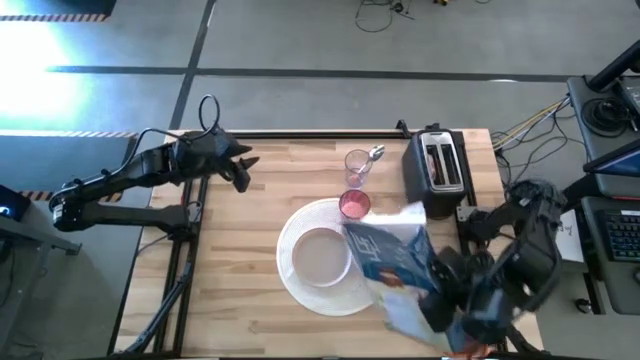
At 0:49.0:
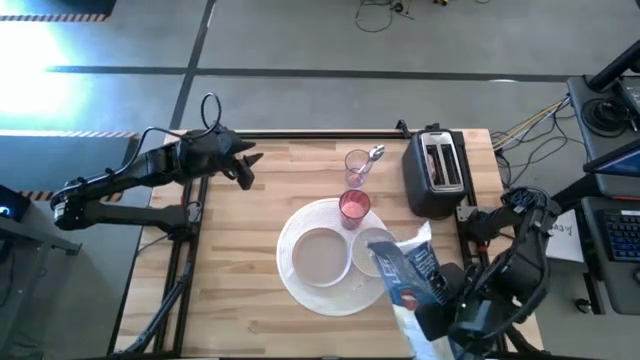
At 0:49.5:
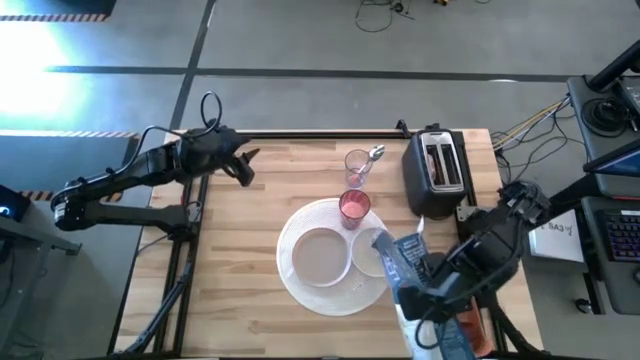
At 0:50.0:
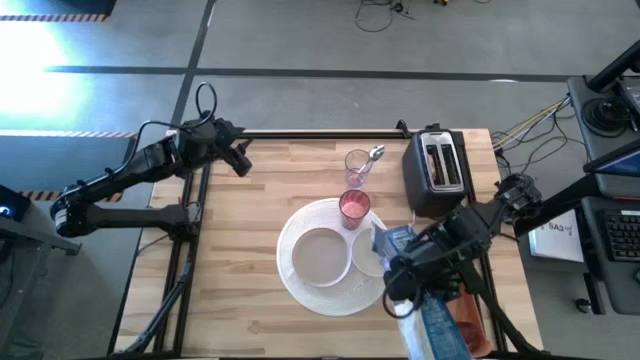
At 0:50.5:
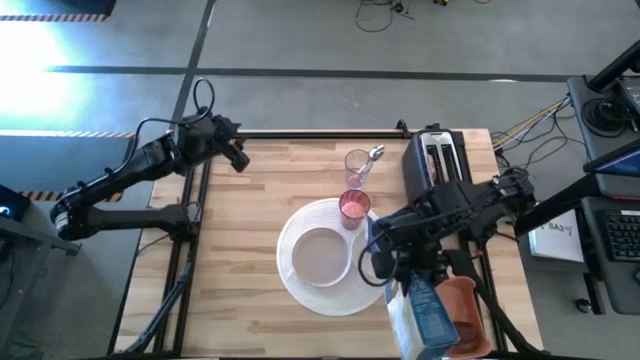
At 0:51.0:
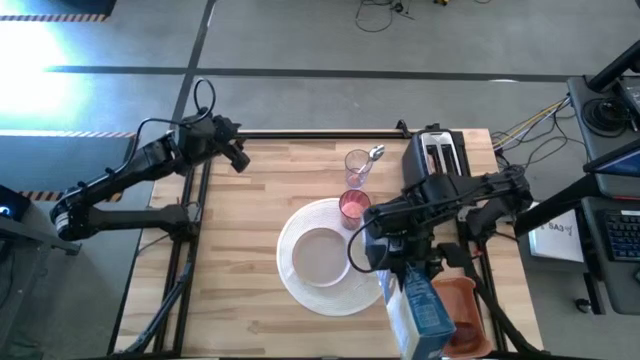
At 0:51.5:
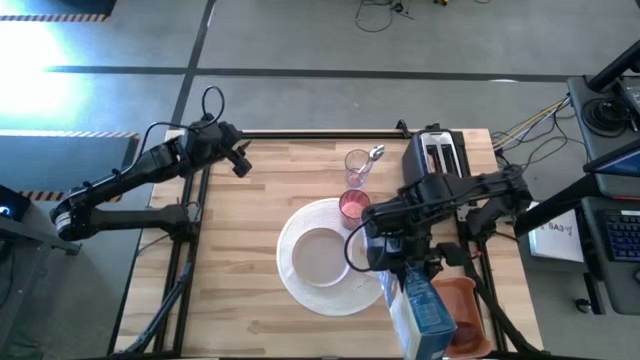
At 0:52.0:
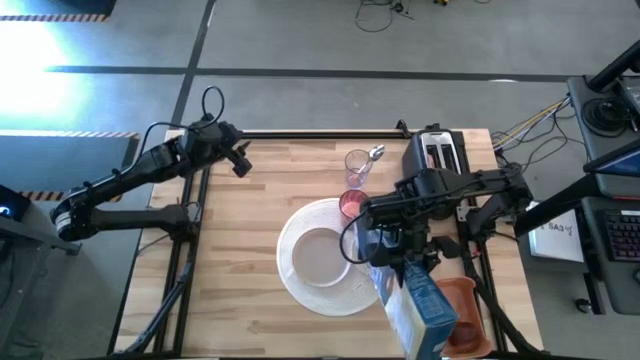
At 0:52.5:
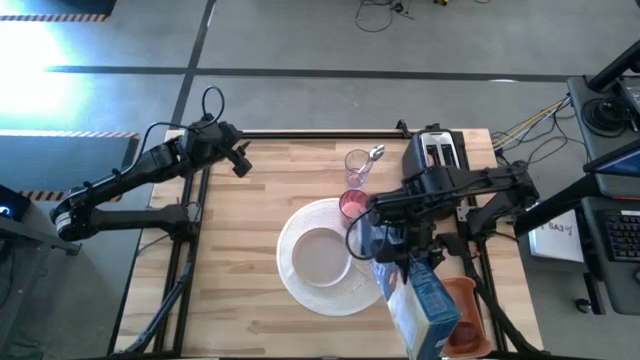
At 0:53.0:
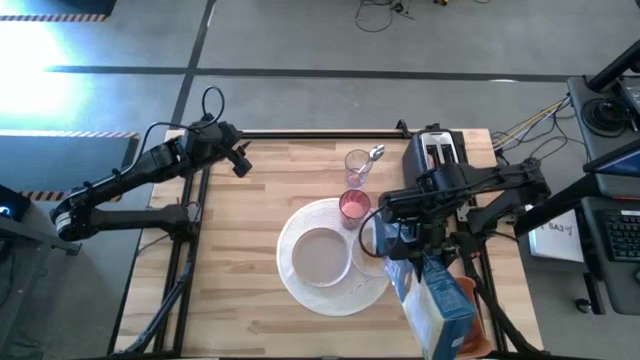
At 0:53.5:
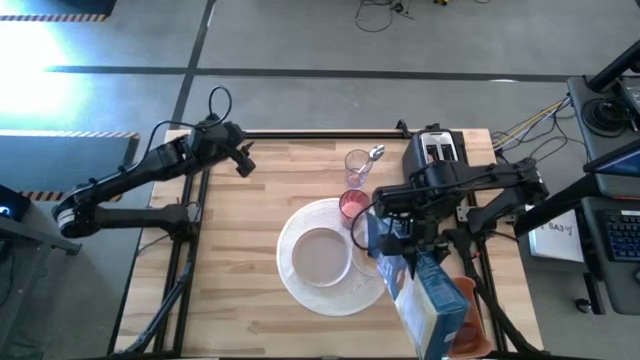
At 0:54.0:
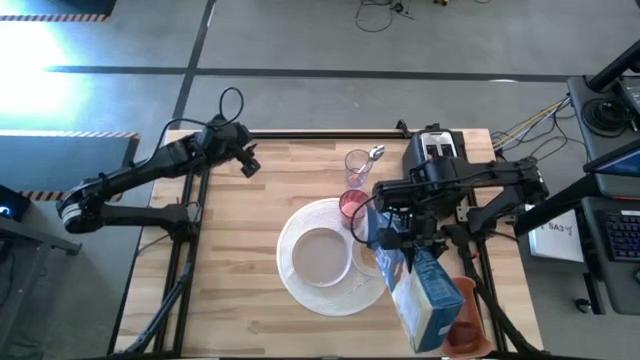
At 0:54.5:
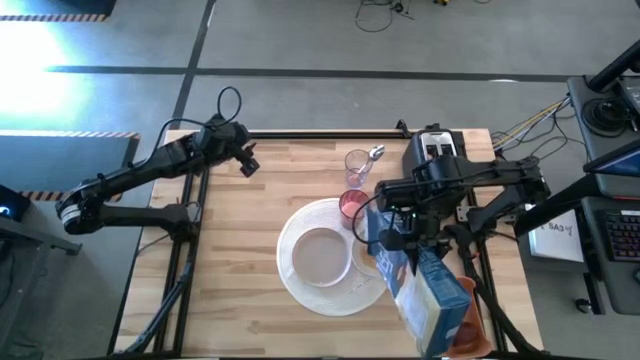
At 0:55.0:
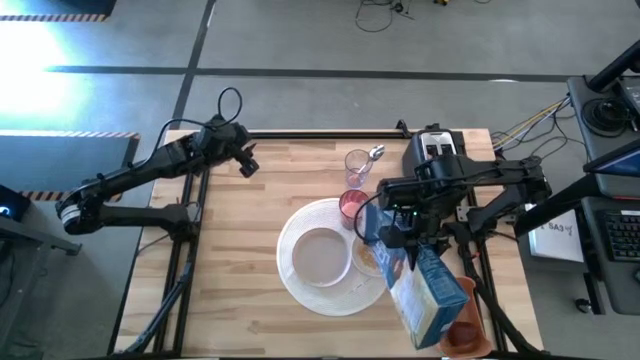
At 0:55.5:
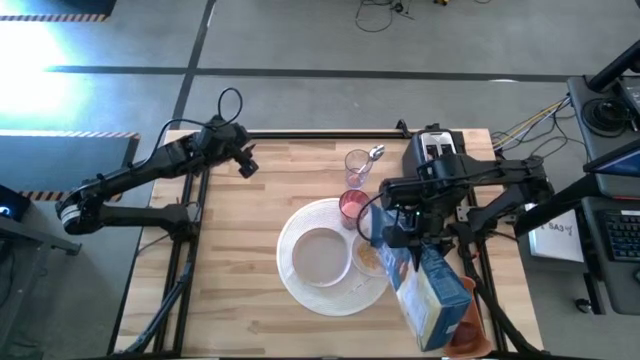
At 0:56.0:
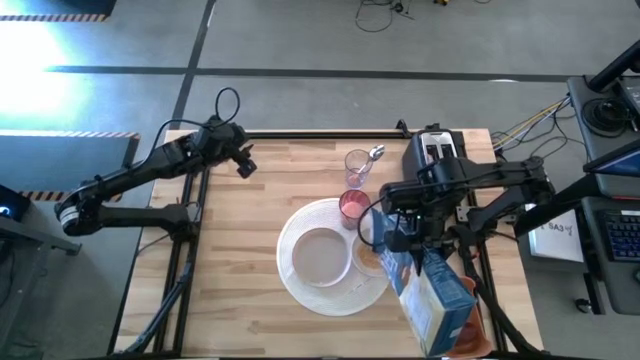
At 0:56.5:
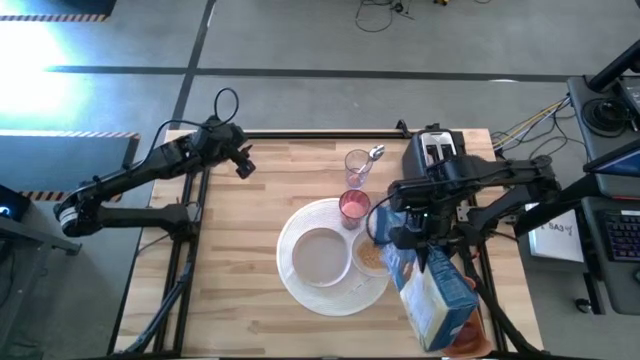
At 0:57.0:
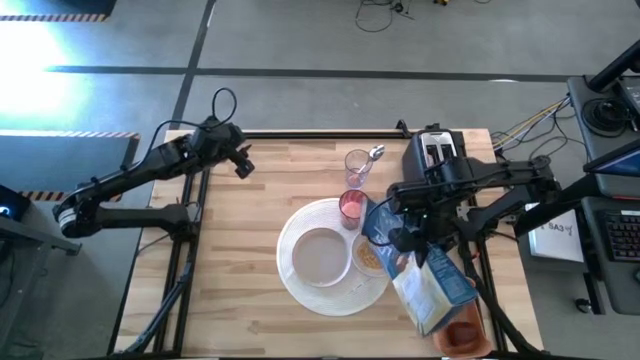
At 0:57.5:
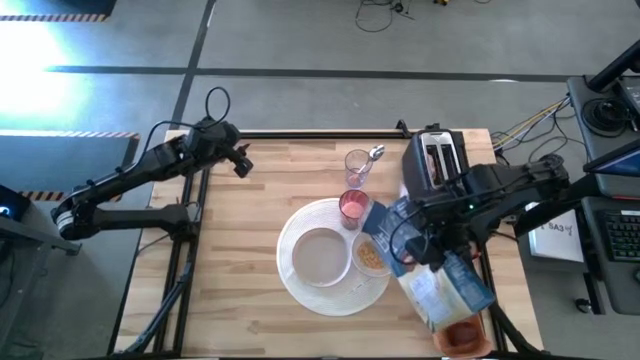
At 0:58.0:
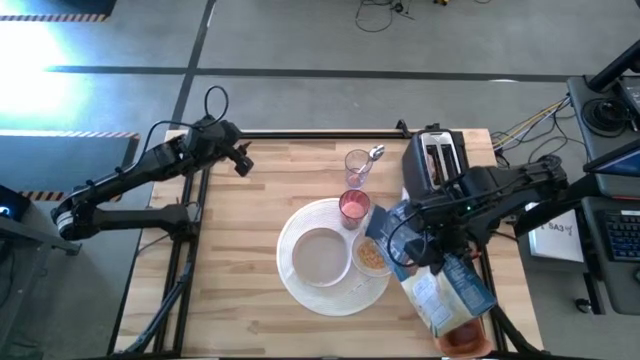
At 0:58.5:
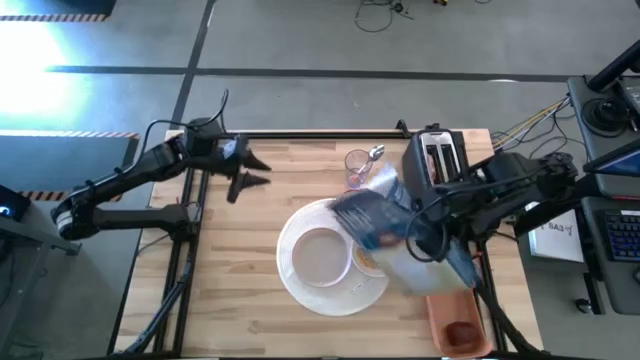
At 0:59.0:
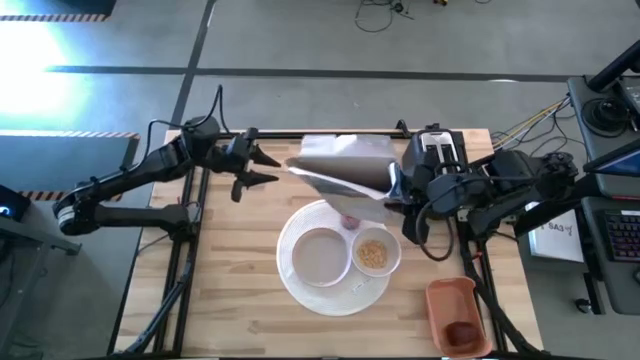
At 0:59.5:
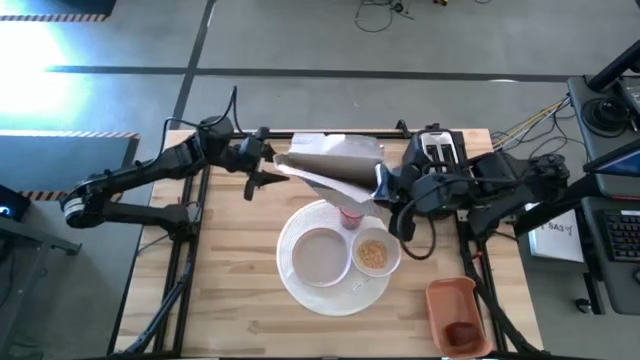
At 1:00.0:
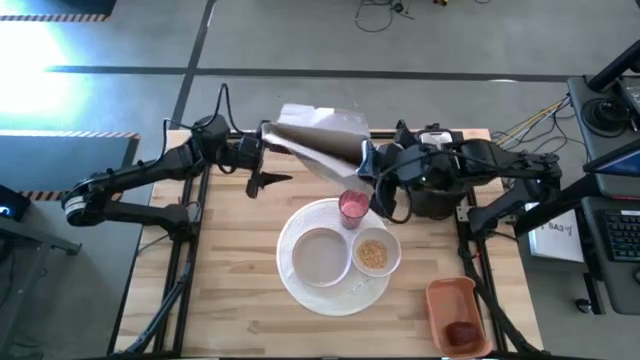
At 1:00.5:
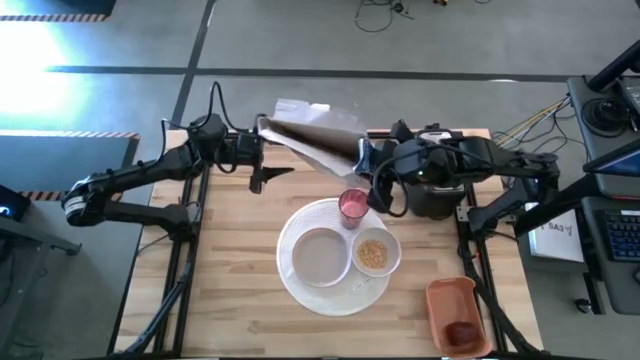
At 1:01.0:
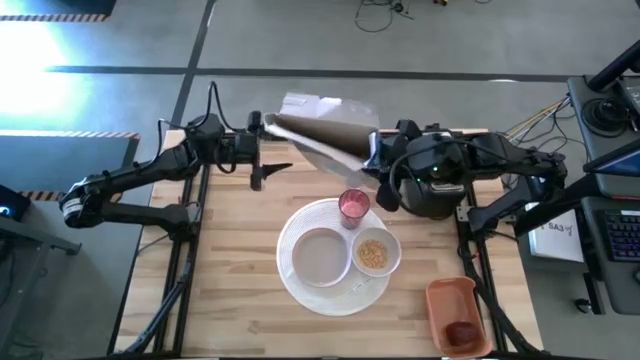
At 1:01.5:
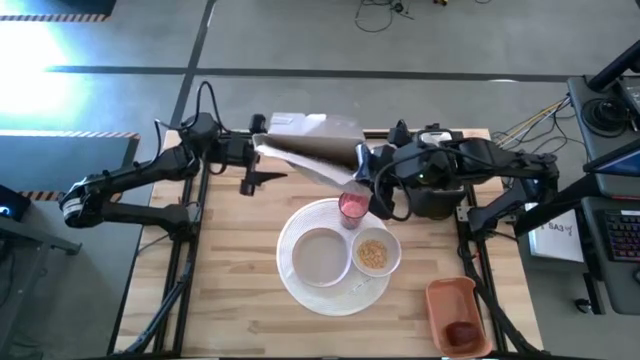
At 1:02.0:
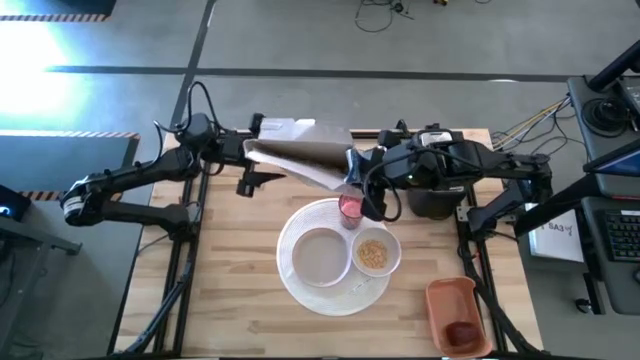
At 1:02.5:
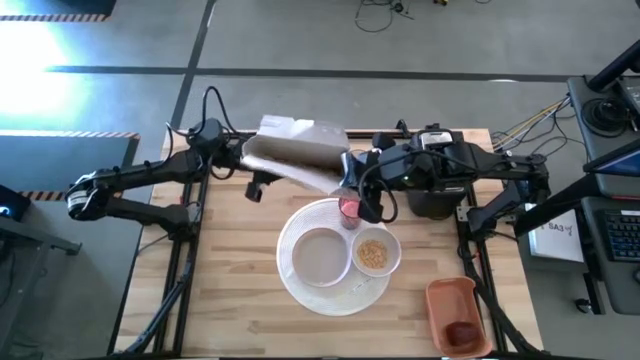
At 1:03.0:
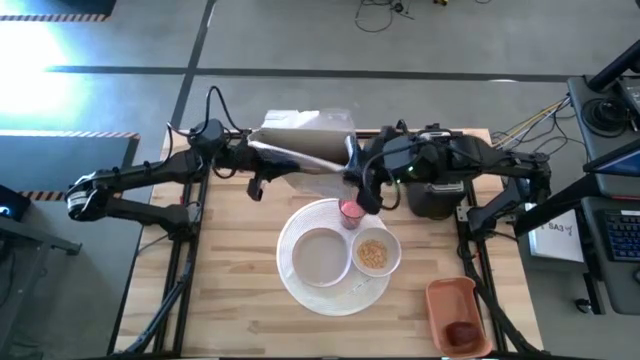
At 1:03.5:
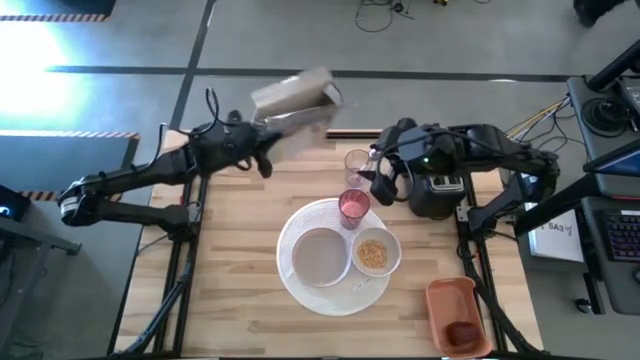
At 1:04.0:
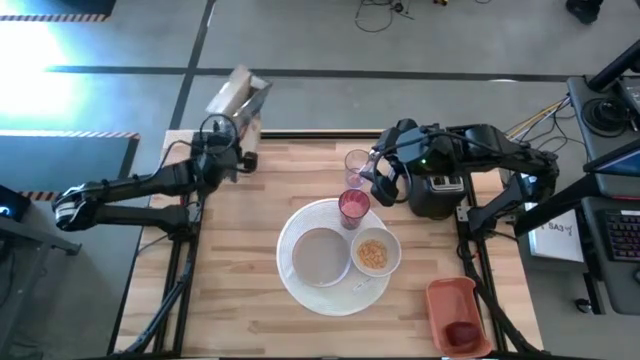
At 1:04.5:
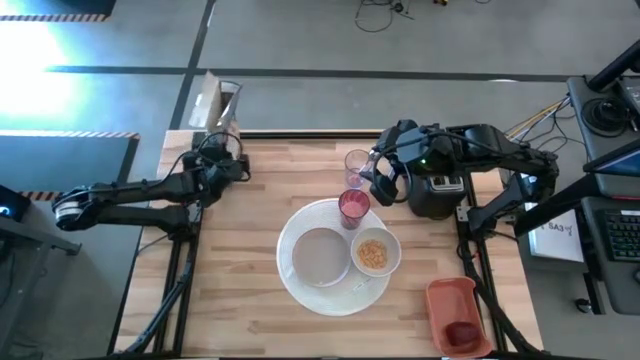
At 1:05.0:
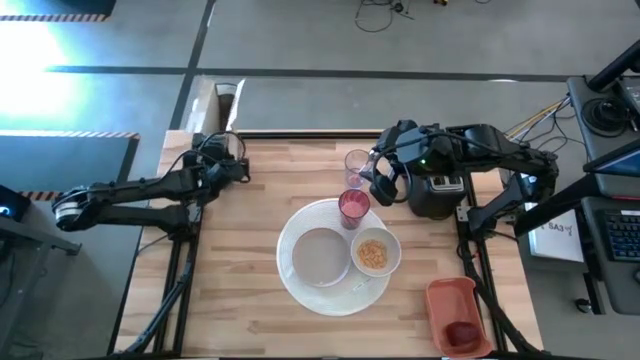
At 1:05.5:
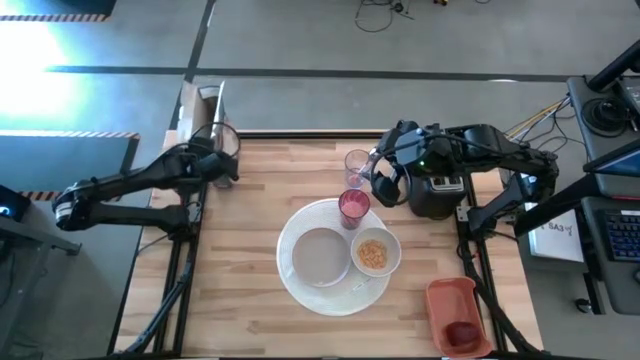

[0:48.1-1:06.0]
Task: Arrange a breakfast setting
Pour the cereal from the cereal box into the white bowl

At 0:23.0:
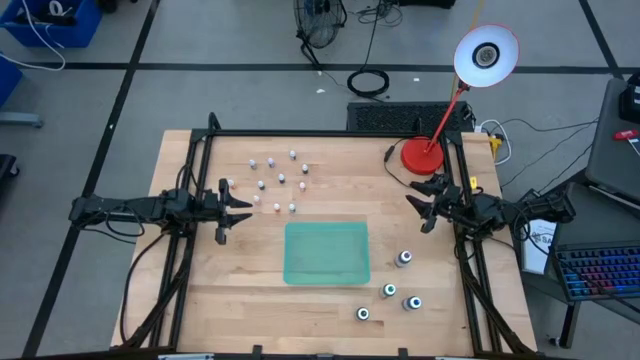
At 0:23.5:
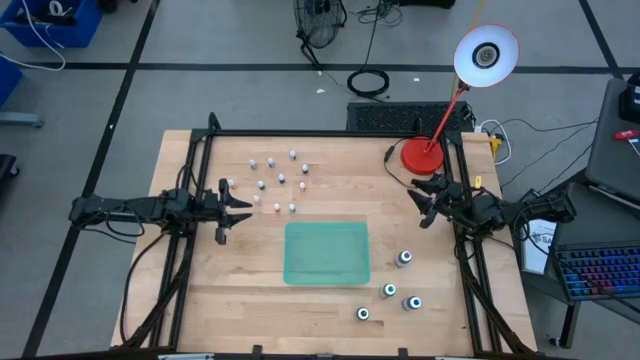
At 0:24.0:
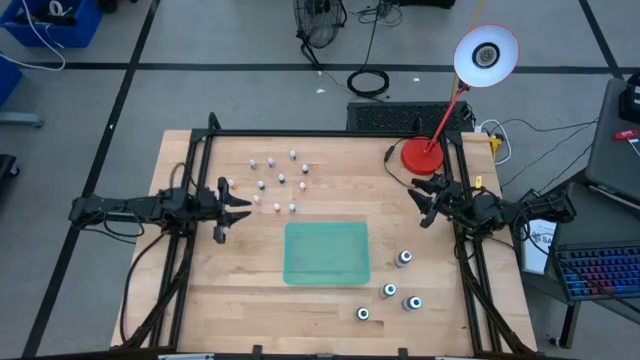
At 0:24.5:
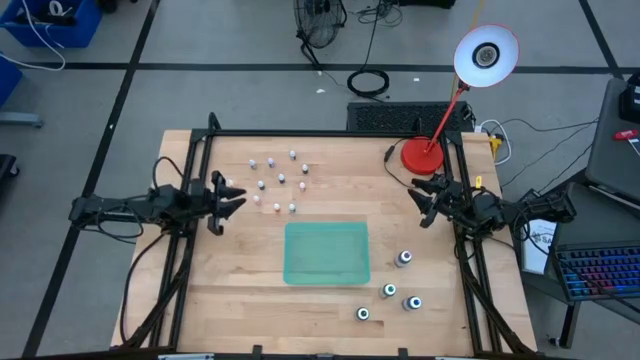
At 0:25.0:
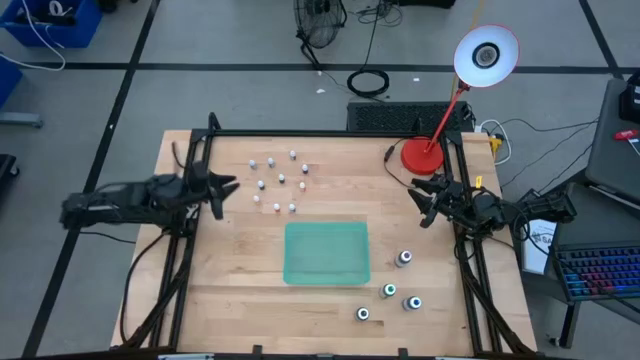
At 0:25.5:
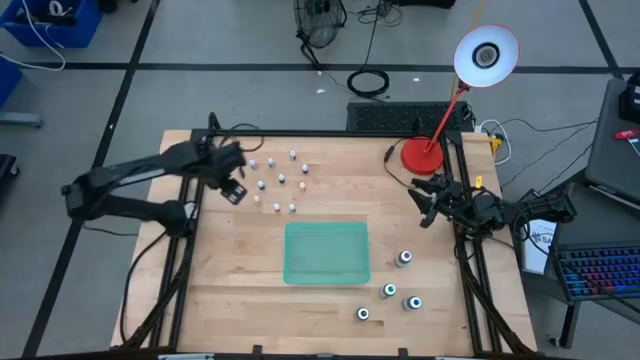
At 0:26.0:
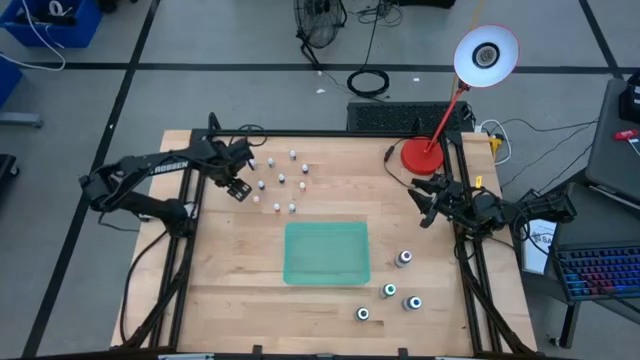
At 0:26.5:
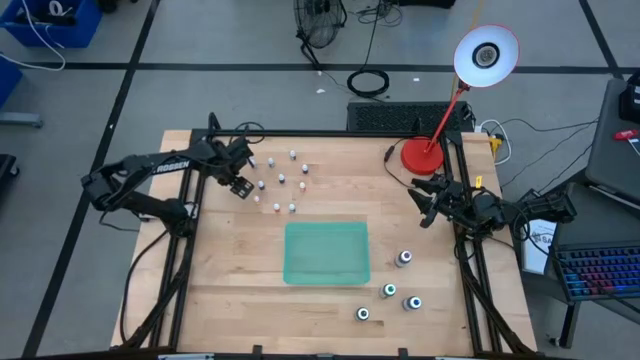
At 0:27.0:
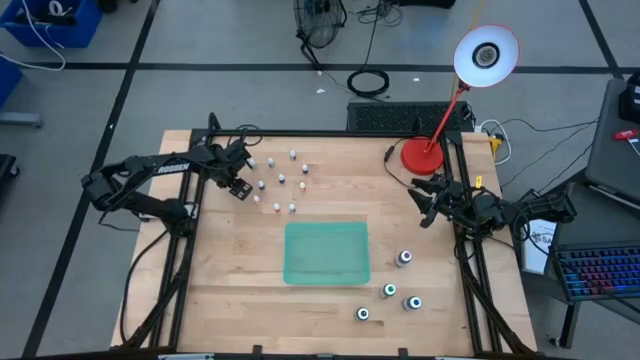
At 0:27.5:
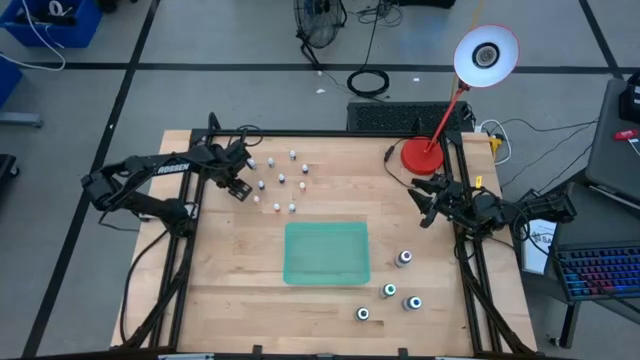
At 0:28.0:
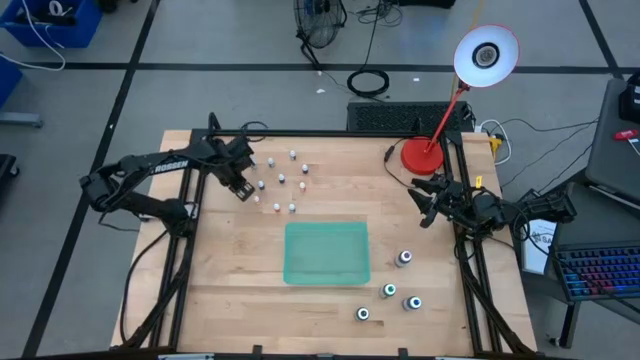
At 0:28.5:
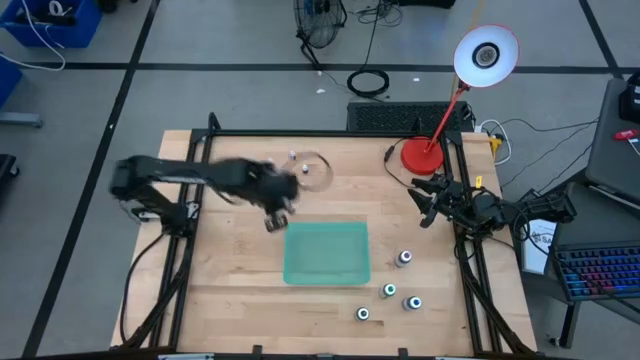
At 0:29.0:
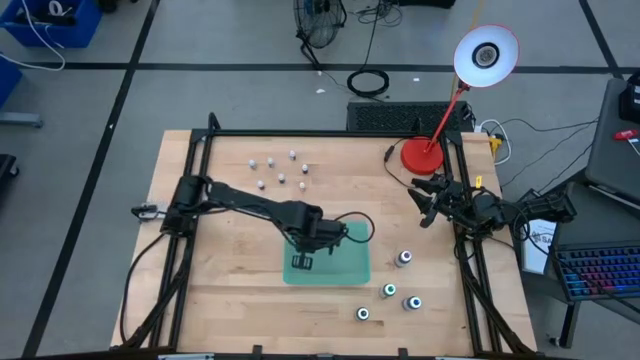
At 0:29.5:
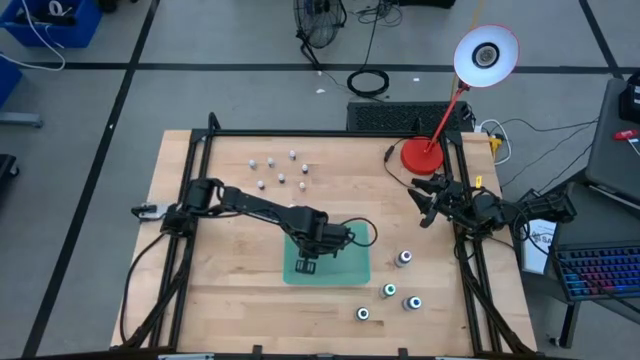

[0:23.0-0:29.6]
Task: Pick & Place food coloring
Put the small orange food coloring bottle into the blue bin
